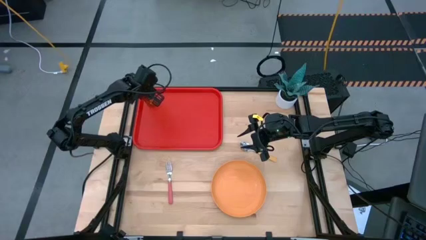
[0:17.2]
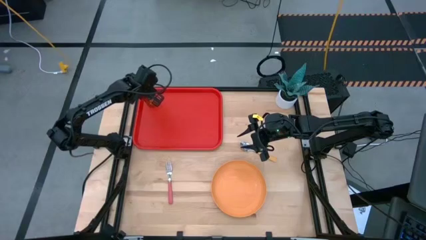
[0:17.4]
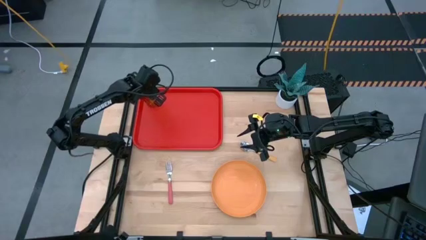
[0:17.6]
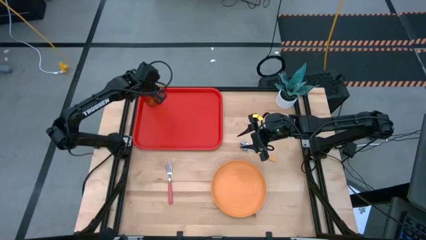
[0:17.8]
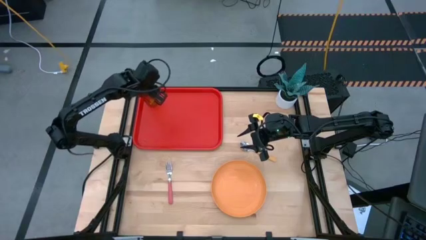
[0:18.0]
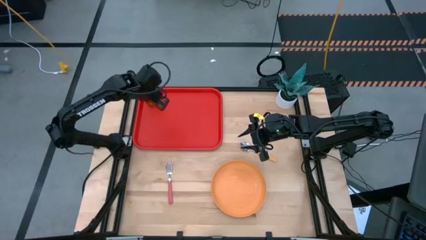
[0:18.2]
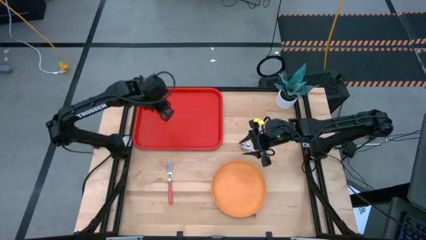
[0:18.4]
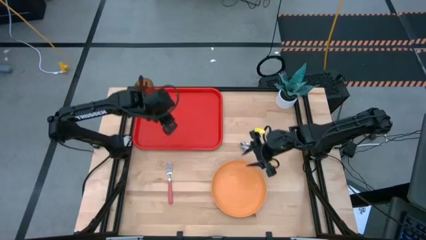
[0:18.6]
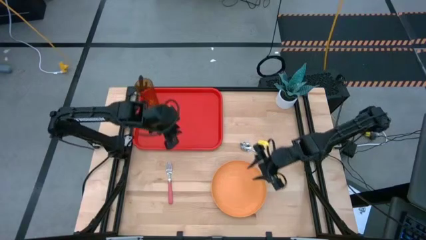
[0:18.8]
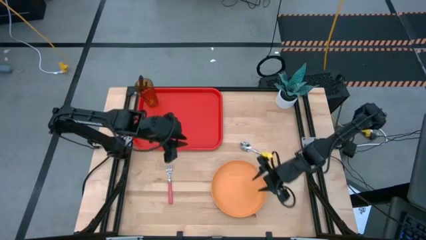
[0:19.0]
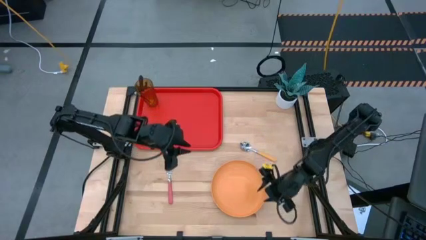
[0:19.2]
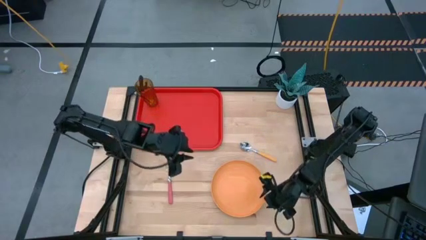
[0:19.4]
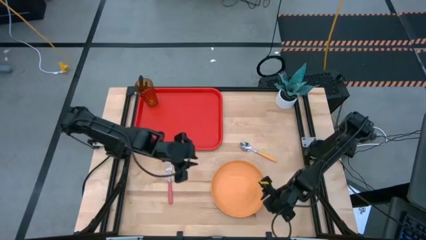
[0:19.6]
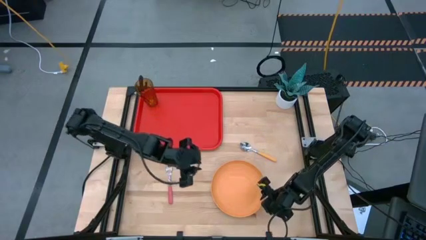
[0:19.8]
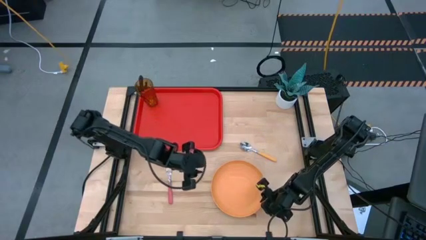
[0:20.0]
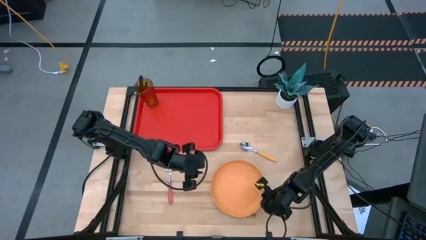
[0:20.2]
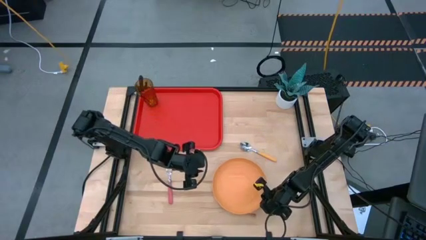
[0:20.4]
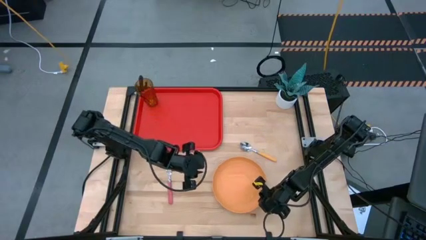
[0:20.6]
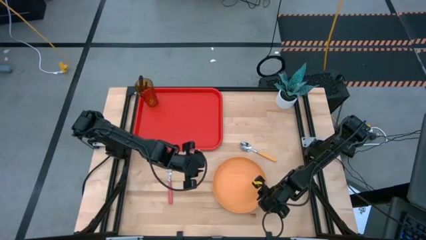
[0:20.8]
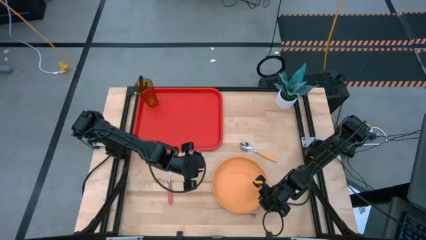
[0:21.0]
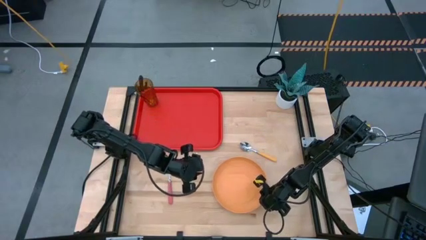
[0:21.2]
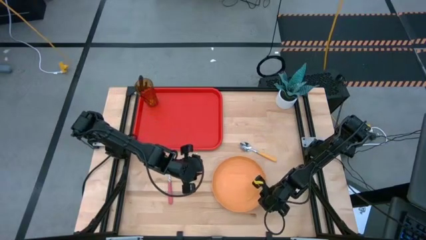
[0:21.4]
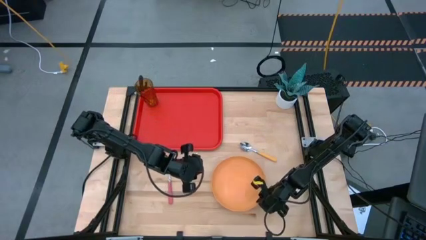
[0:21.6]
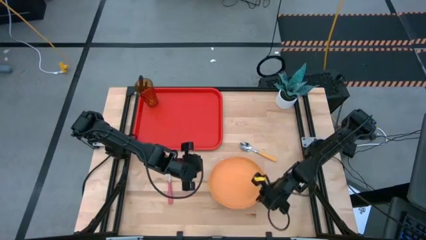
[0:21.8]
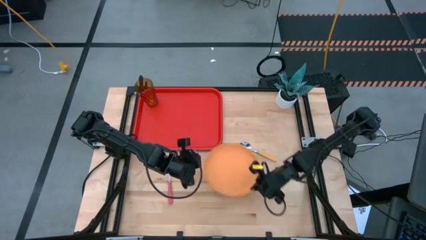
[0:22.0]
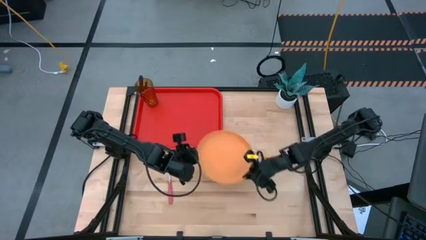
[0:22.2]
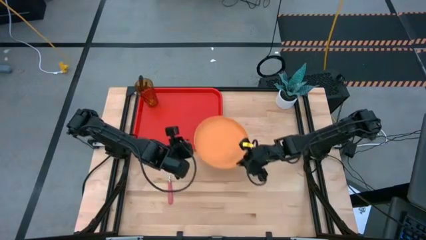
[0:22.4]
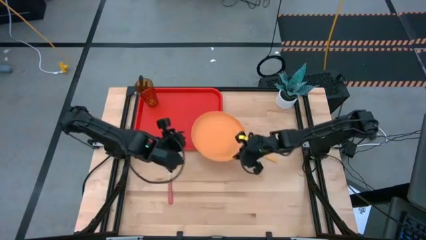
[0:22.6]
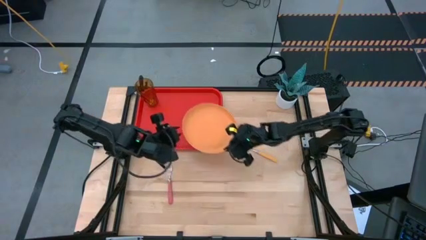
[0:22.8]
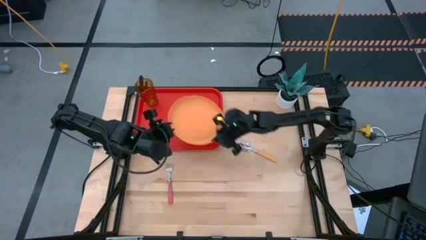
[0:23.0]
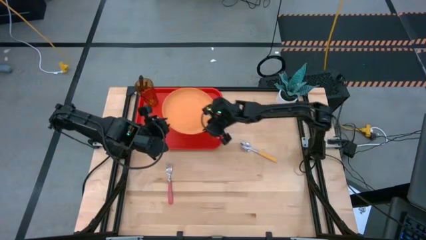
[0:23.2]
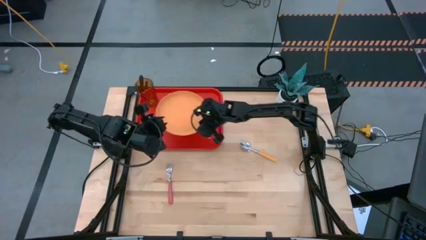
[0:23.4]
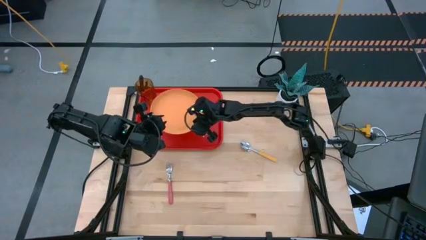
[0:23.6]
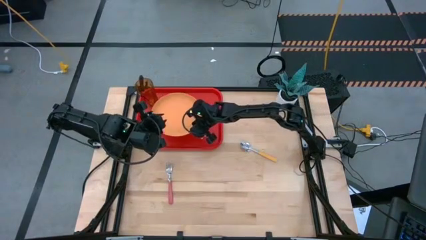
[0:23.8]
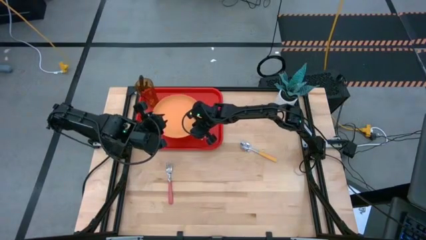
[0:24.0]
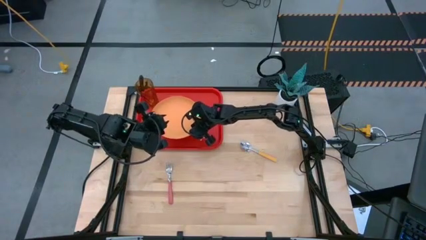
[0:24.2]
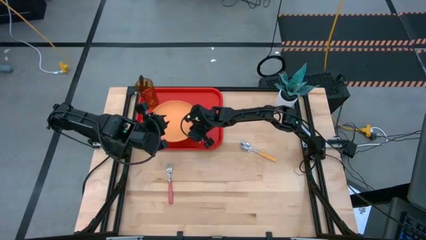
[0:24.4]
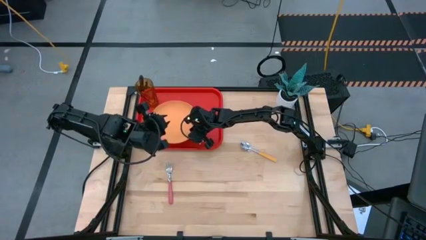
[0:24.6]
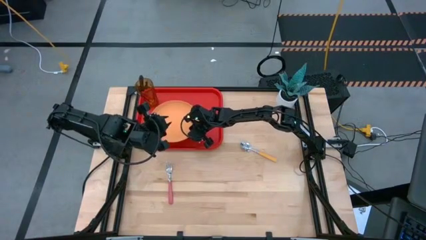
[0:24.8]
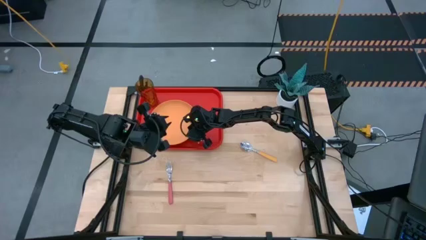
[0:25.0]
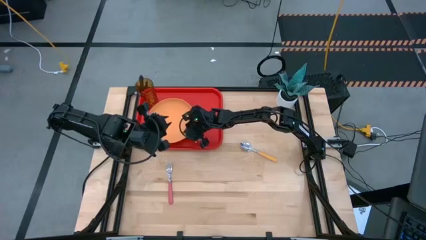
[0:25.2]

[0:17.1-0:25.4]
Task: Pick and place plate/cup/fork/spoon on tray
Put the orange plate on the red tray

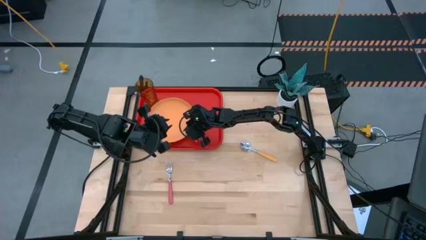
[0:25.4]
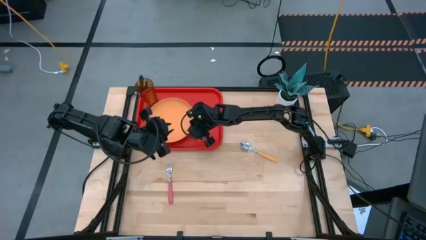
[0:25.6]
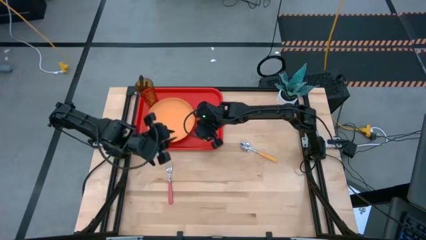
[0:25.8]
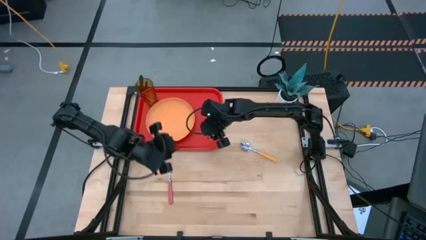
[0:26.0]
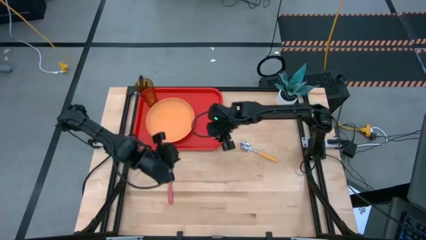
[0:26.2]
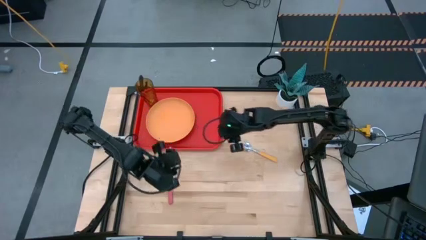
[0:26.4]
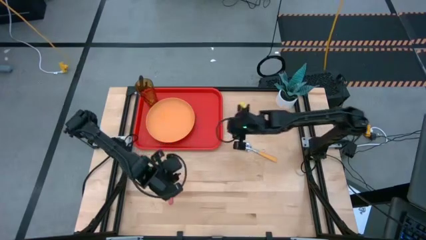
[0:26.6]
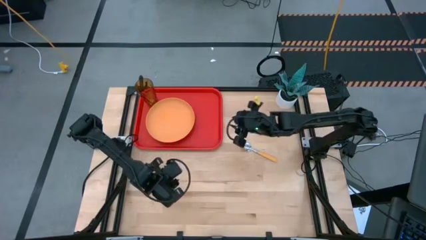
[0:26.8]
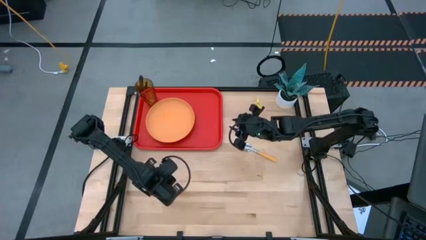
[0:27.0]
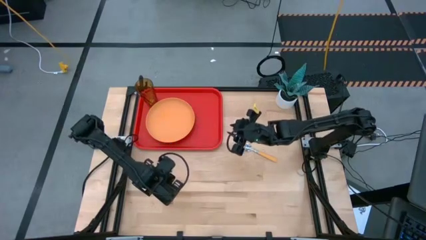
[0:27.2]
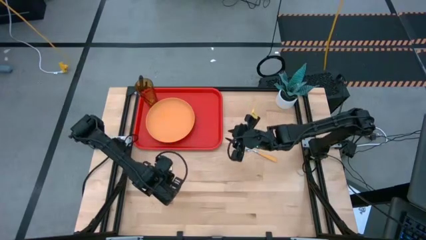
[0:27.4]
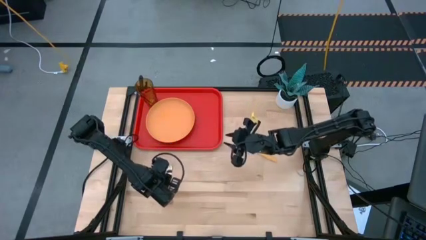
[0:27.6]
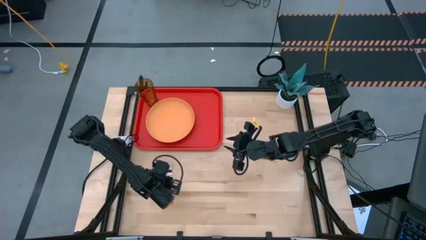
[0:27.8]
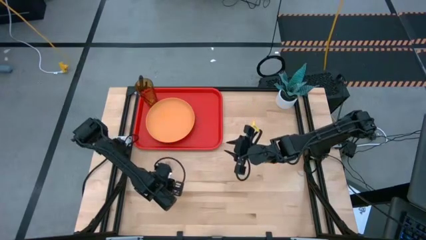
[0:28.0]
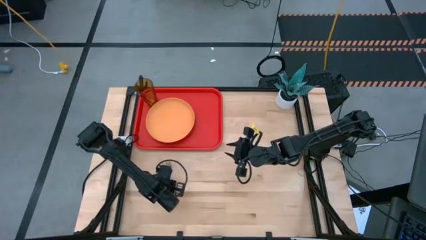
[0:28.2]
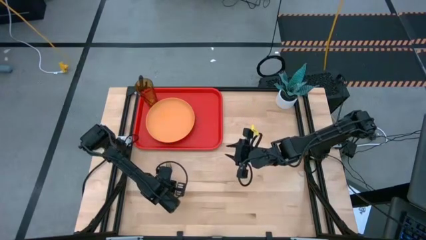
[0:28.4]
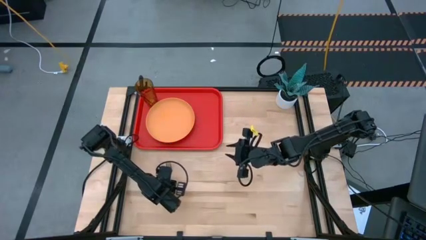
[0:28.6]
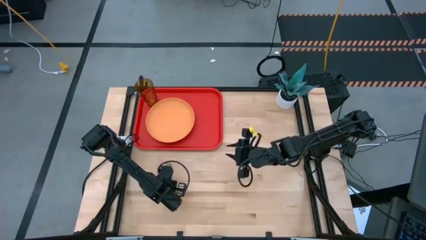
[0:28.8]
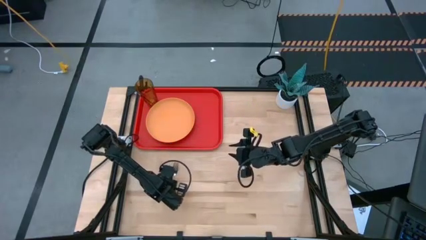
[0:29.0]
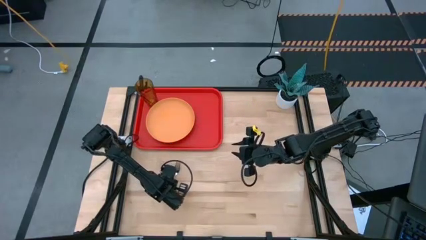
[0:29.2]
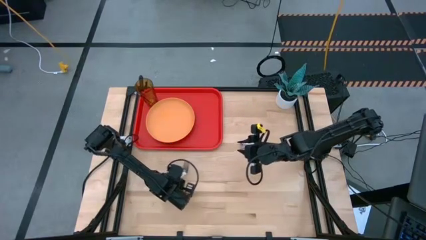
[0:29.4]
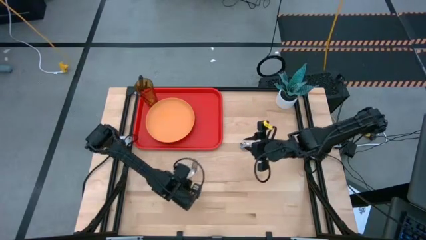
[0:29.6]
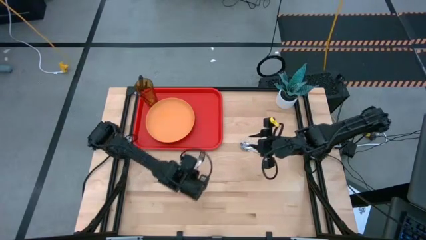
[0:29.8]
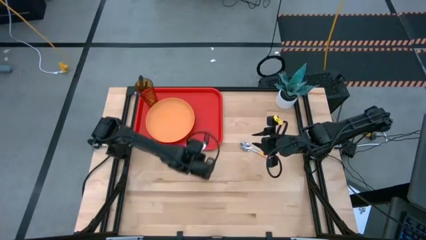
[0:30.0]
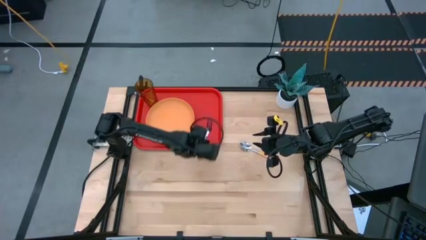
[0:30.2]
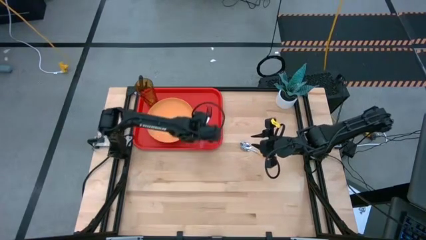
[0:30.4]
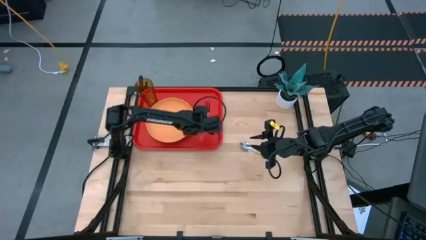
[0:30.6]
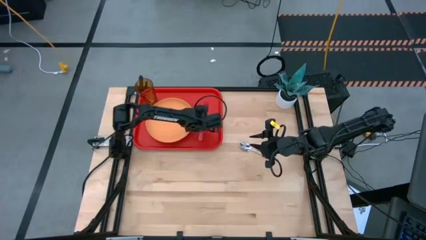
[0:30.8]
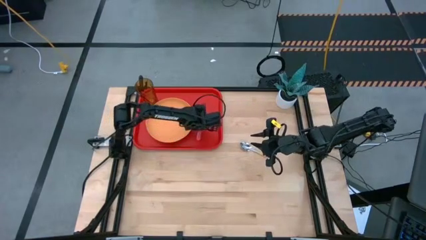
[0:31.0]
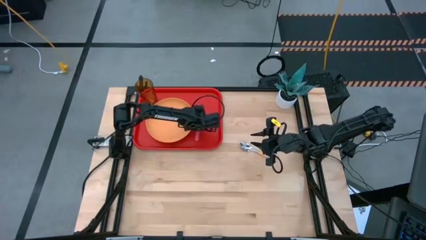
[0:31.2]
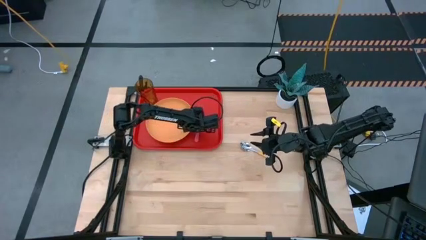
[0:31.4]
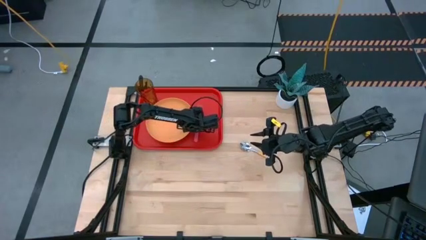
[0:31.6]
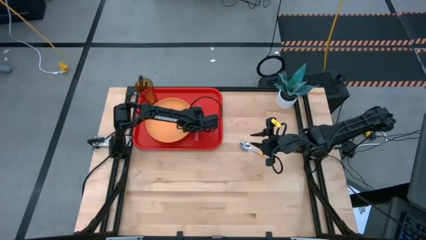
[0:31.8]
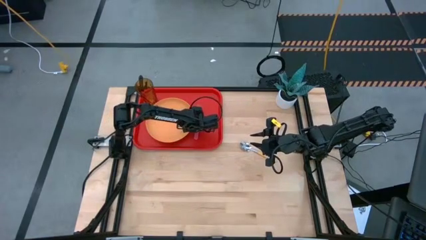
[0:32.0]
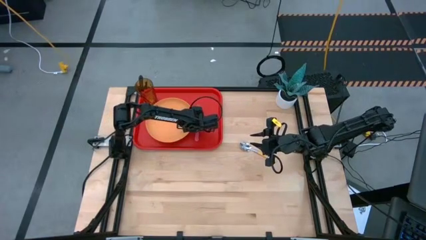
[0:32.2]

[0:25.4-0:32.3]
Put the pink fork on the red tray to the right of the orange plate
